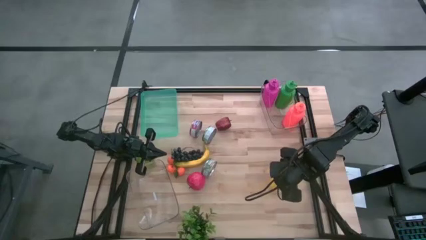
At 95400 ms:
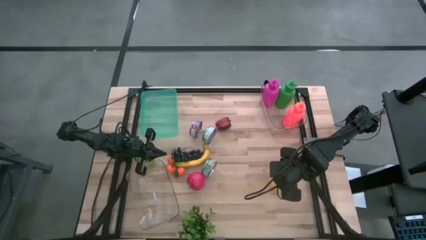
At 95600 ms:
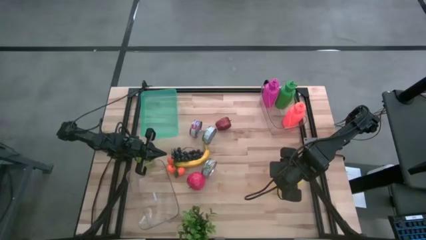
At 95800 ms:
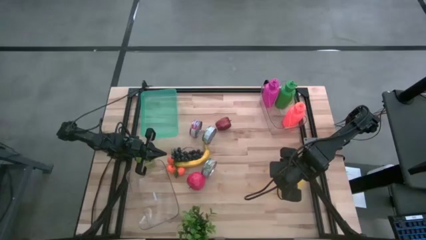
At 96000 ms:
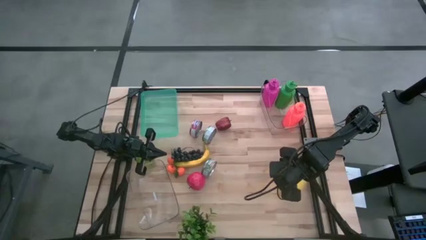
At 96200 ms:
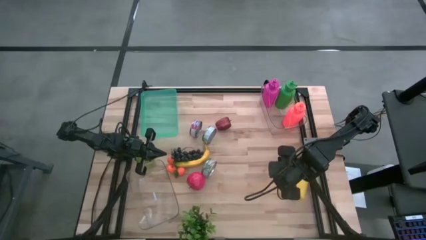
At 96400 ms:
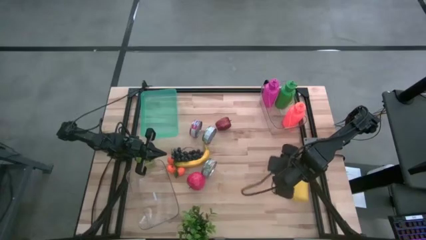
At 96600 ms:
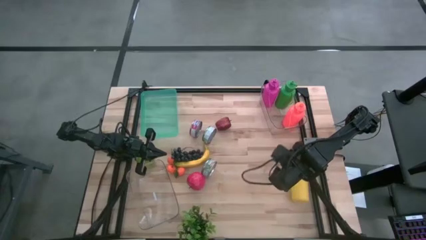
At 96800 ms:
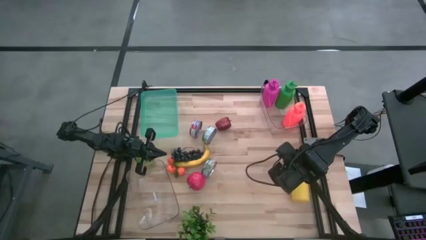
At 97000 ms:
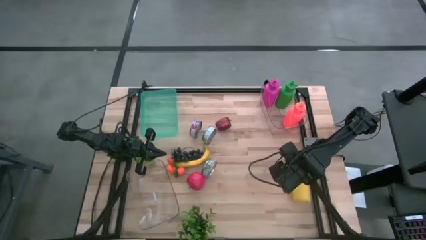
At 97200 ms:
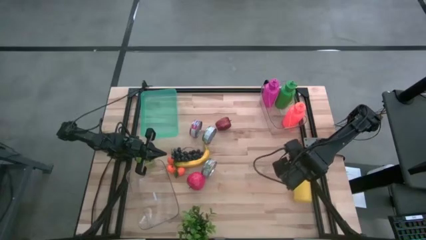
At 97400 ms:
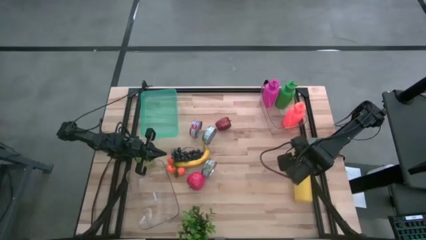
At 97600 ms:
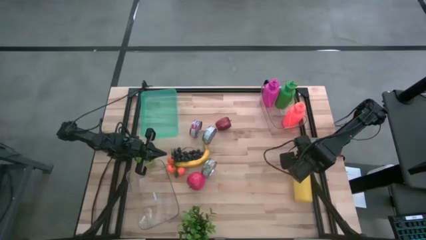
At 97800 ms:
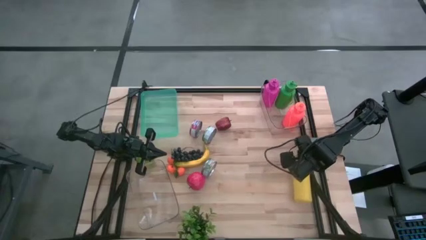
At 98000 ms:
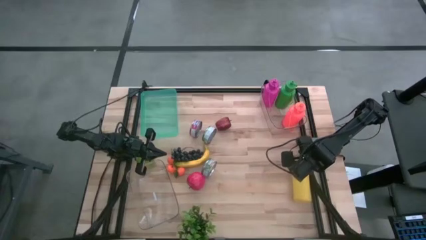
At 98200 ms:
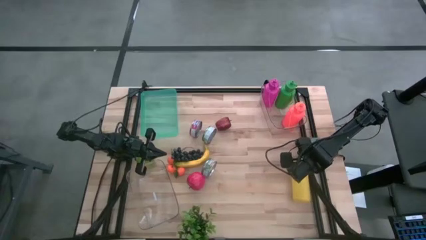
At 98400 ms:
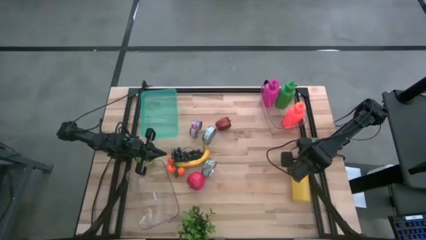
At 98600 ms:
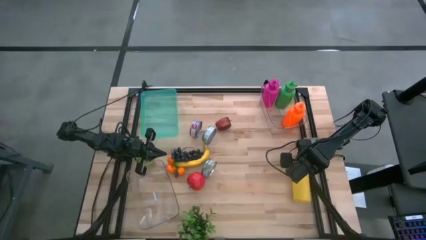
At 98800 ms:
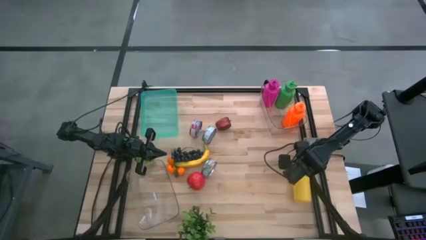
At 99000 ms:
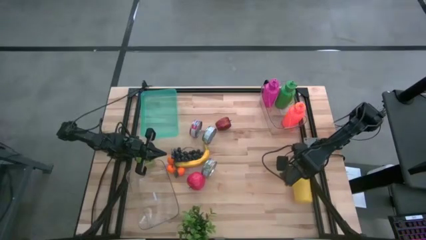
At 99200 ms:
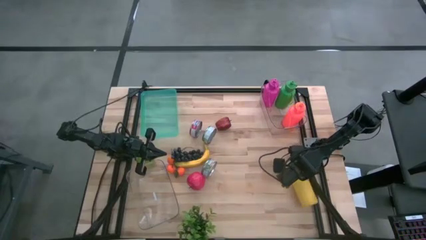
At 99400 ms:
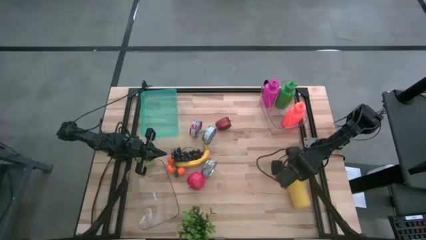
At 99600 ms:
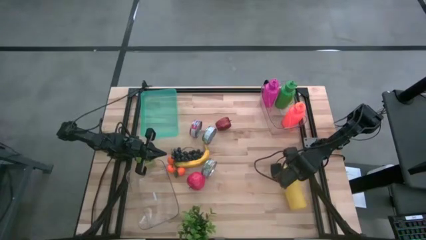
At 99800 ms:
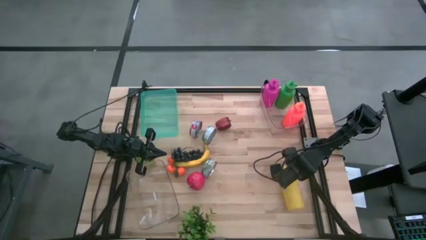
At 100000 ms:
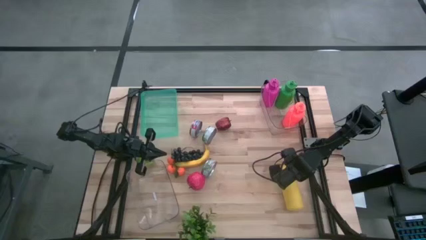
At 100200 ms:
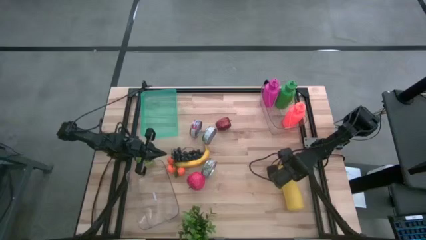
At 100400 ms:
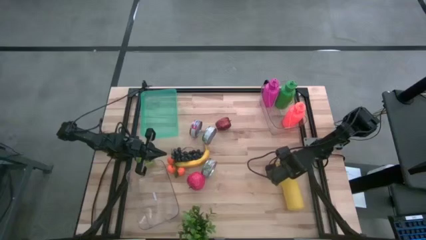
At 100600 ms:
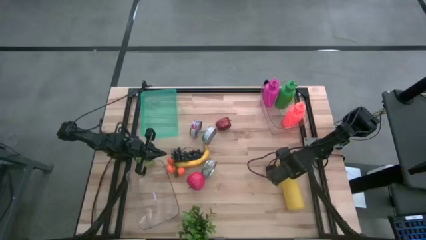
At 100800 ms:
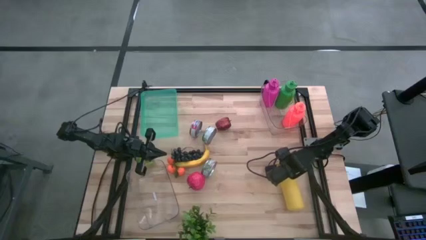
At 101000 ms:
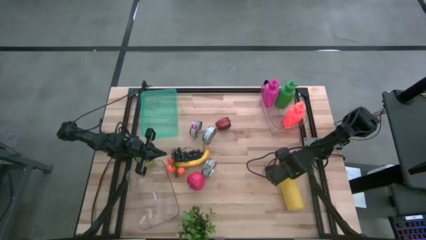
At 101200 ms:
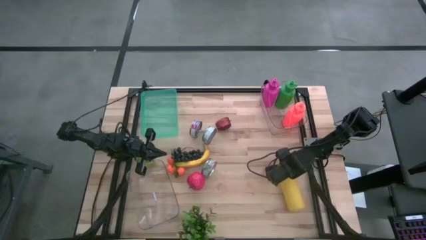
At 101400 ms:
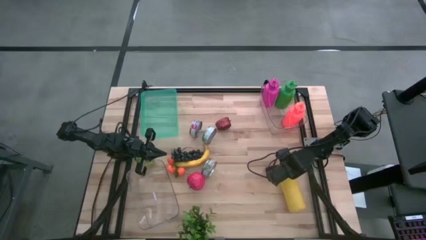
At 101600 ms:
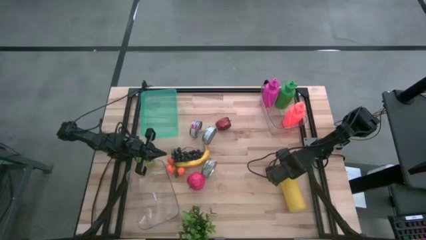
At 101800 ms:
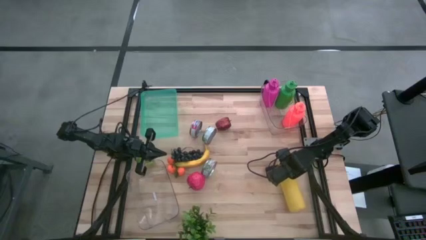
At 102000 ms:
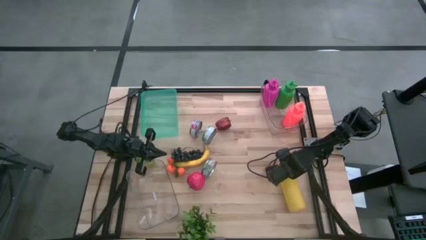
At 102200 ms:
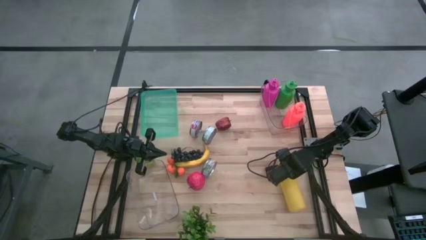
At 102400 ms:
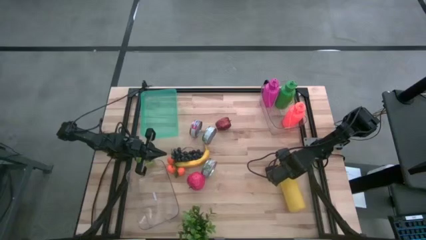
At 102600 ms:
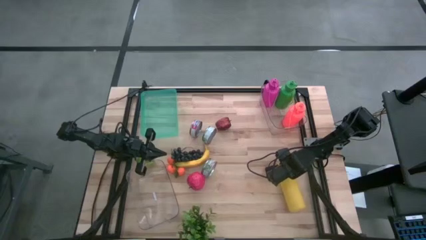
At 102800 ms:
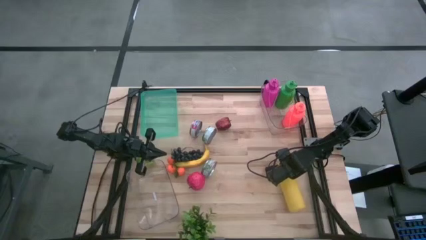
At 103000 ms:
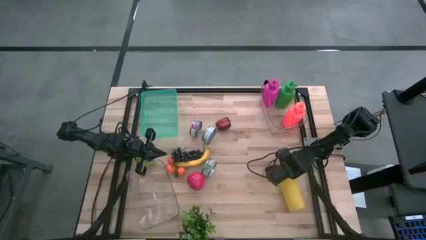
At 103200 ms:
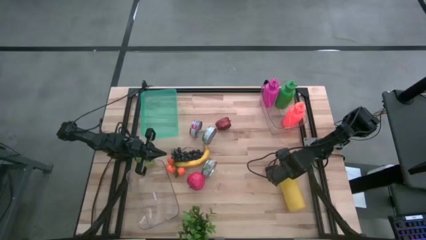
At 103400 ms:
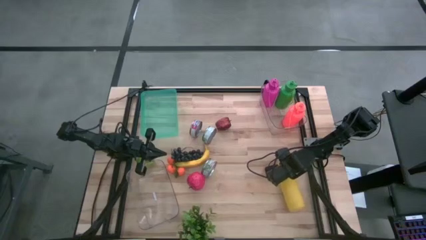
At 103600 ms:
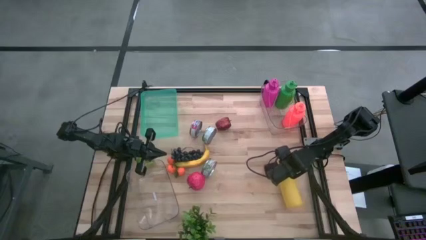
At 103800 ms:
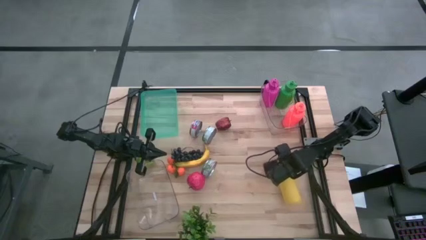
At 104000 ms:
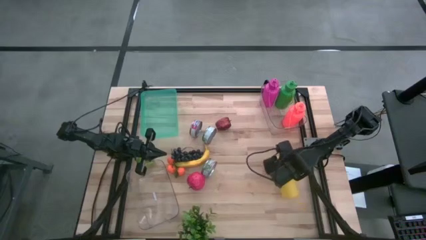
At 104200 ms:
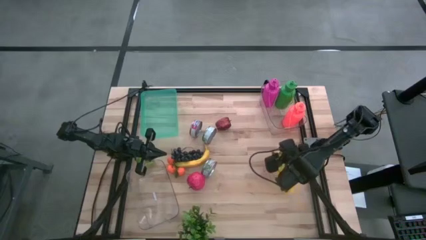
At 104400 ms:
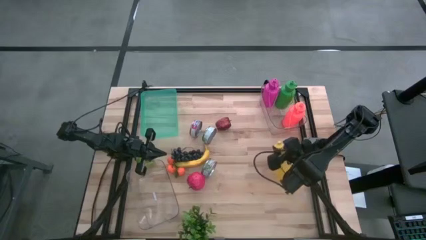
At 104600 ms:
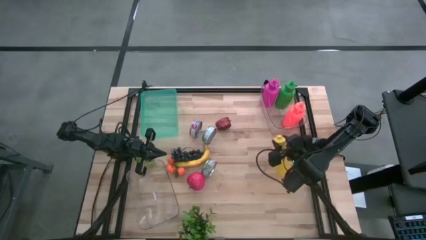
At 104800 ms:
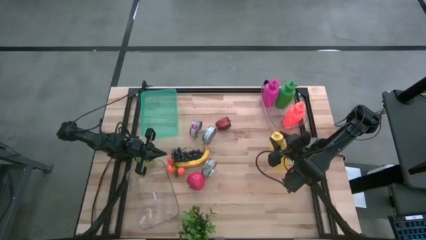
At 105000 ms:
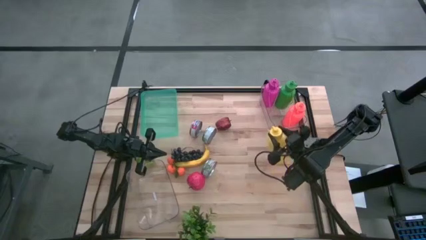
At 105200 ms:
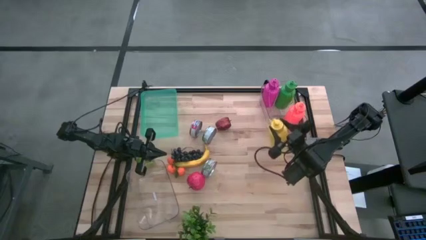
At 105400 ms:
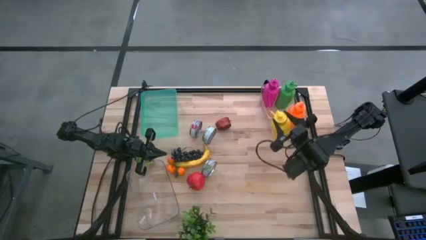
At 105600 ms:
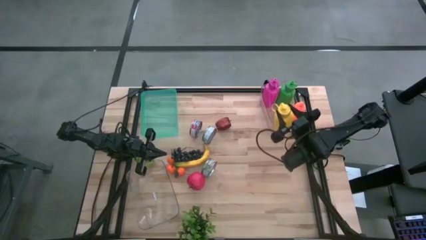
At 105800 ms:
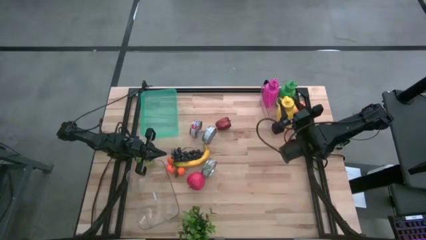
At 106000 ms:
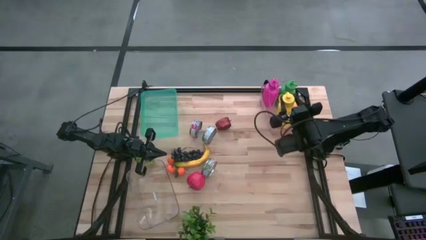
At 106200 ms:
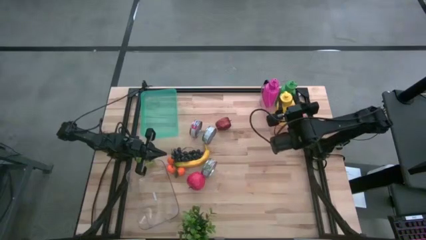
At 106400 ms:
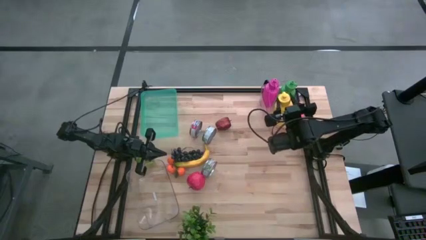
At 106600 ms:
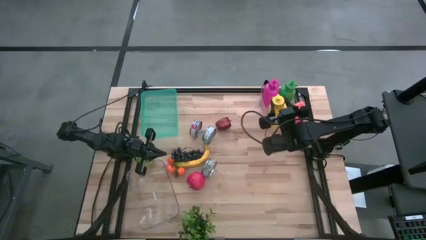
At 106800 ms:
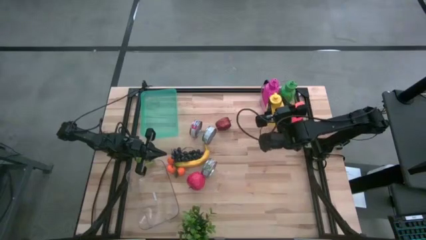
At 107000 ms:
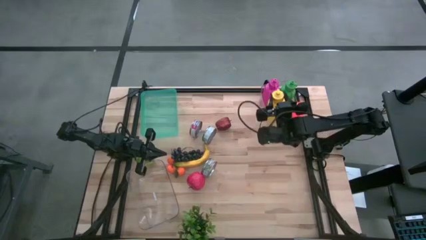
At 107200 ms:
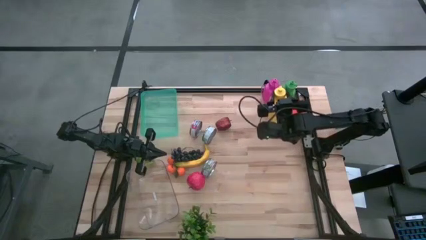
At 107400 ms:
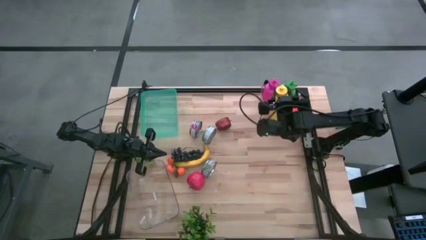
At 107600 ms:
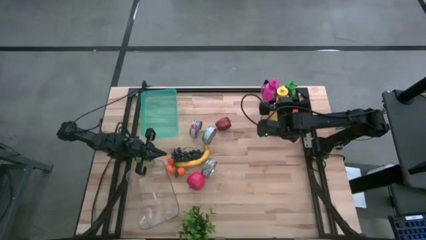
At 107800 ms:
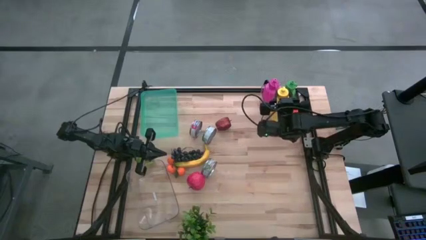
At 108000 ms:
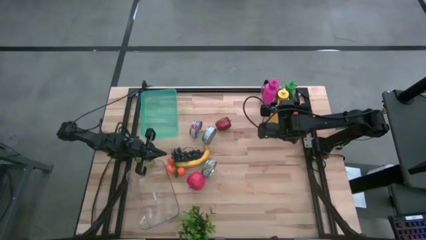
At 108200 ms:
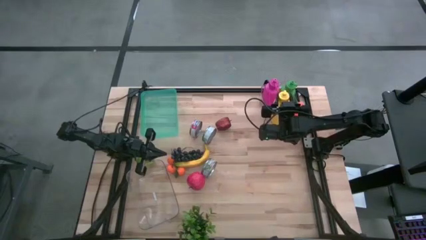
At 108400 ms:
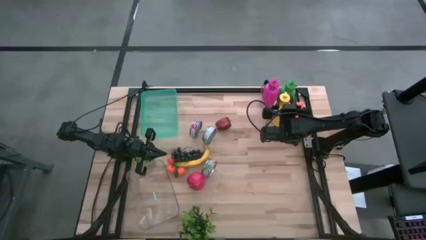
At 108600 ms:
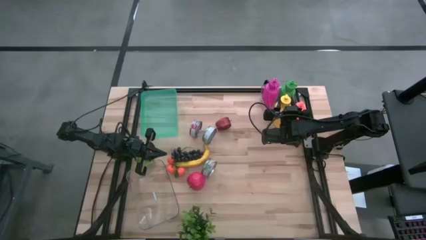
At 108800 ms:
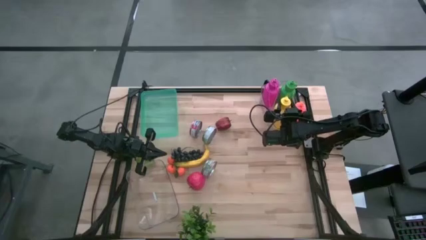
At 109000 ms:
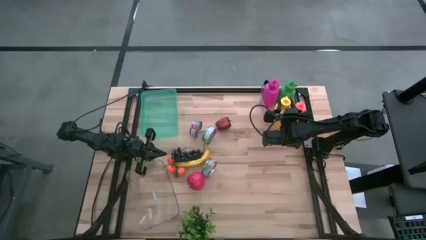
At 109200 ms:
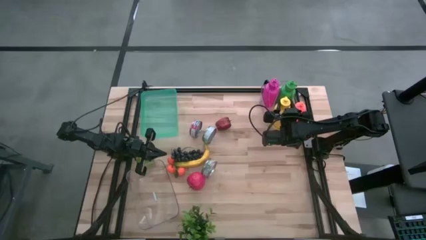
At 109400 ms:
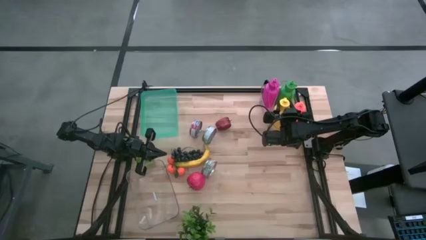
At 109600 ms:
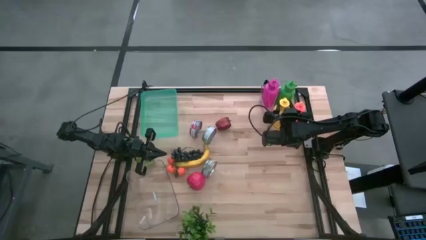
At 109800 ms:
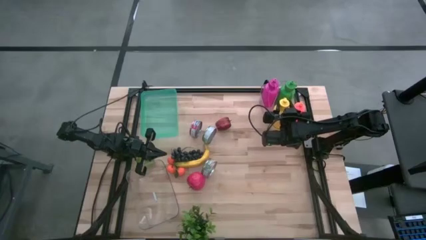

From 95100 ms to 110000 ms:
Task: Pick & Place Food Item
Put the yellow tumbler bottle into the top right transparent bin
